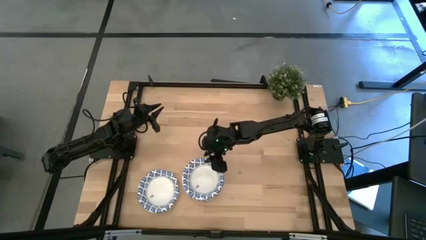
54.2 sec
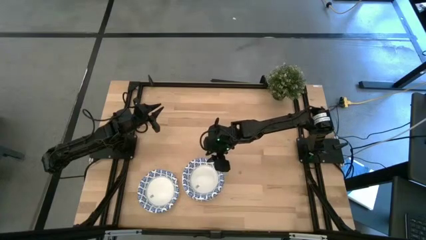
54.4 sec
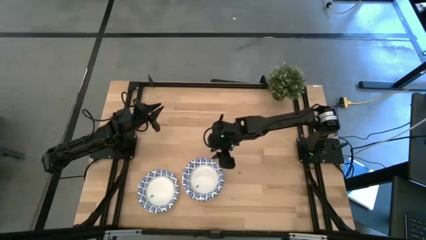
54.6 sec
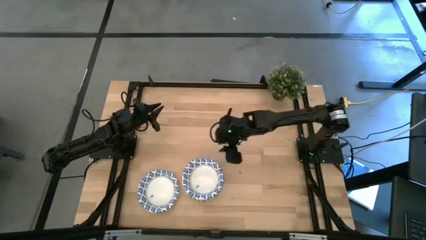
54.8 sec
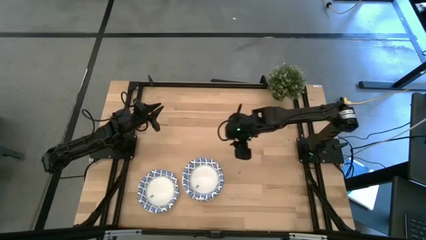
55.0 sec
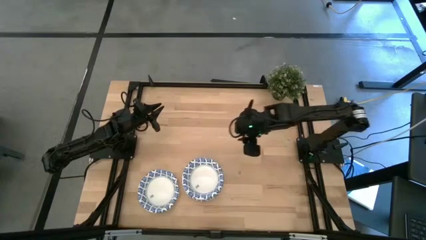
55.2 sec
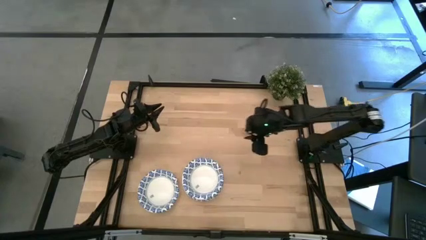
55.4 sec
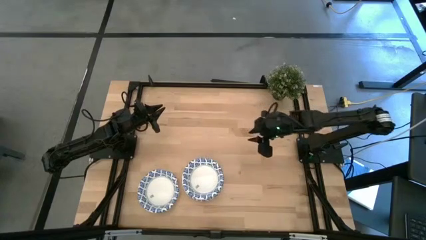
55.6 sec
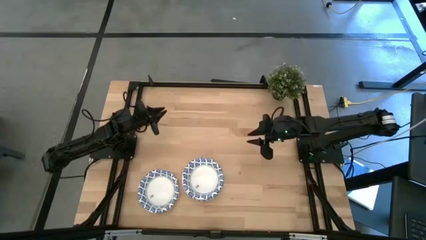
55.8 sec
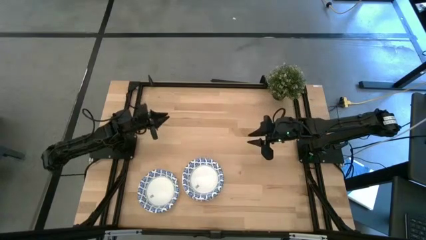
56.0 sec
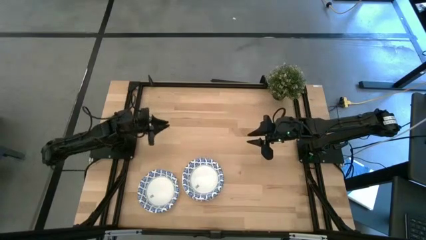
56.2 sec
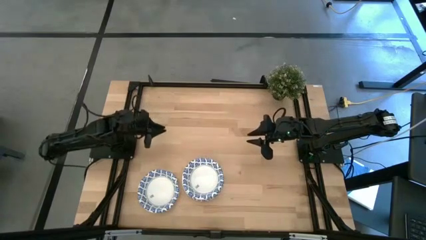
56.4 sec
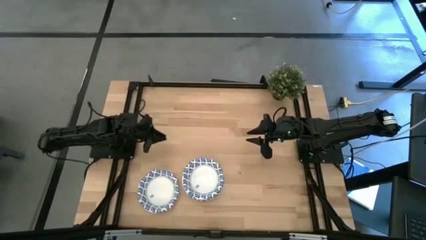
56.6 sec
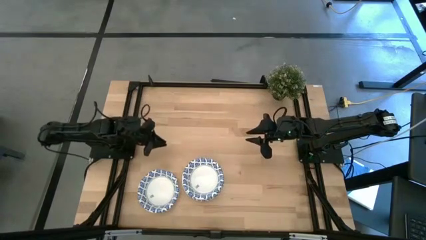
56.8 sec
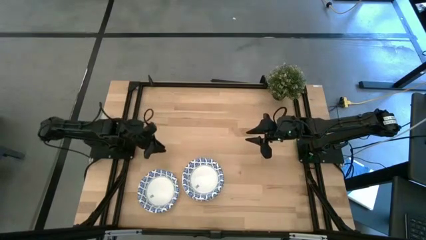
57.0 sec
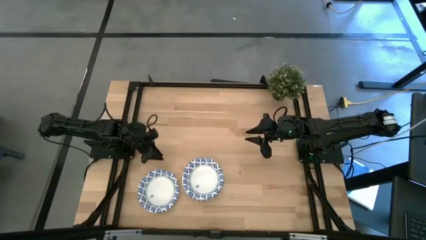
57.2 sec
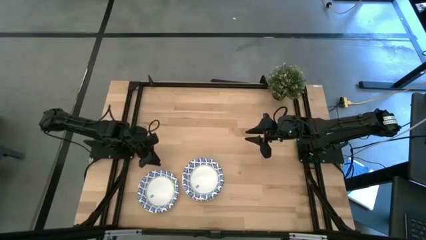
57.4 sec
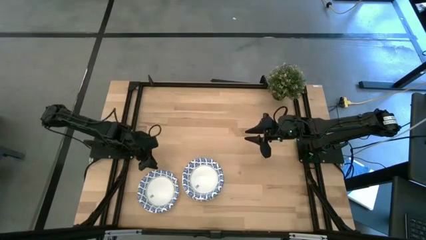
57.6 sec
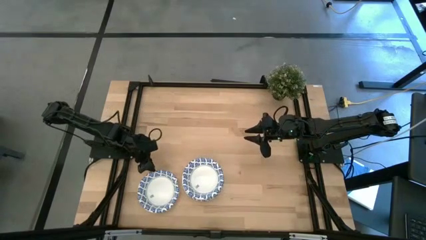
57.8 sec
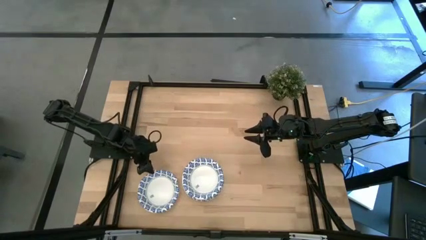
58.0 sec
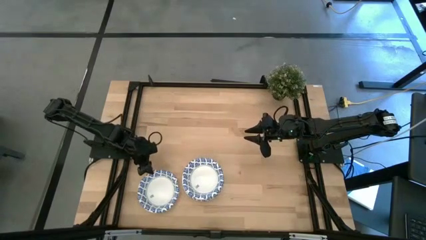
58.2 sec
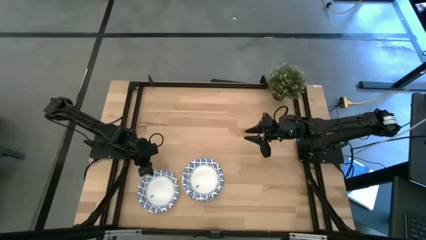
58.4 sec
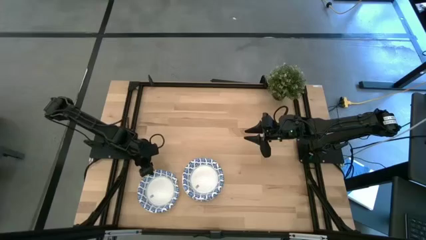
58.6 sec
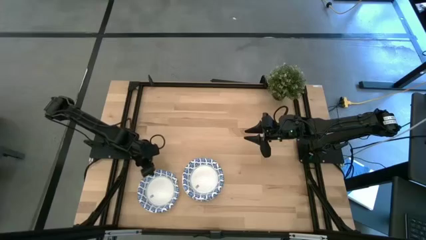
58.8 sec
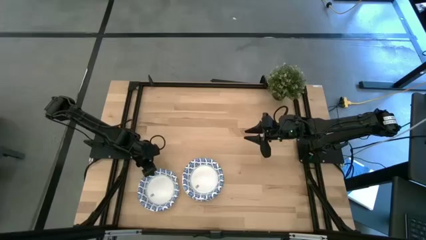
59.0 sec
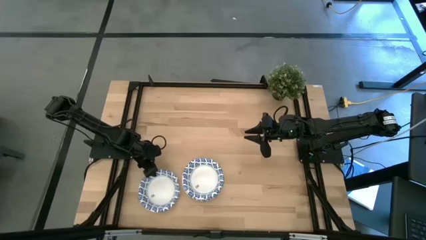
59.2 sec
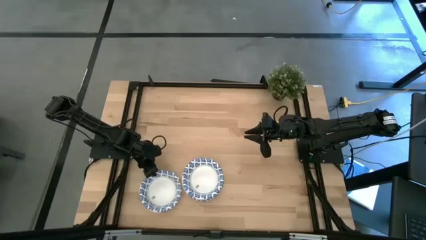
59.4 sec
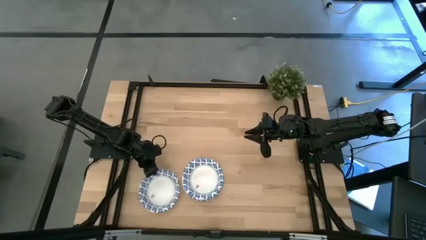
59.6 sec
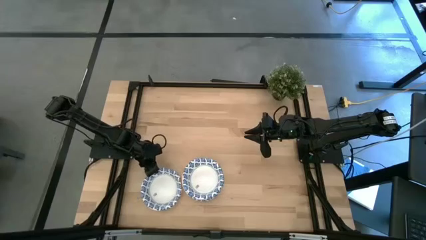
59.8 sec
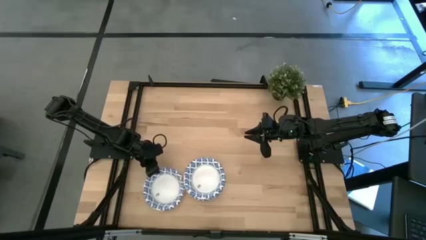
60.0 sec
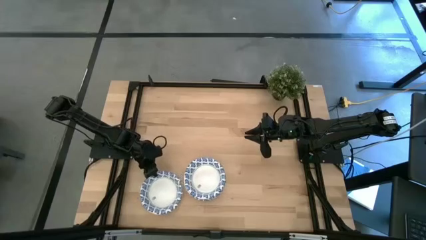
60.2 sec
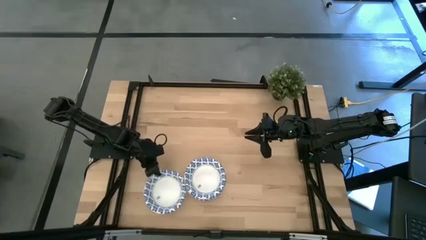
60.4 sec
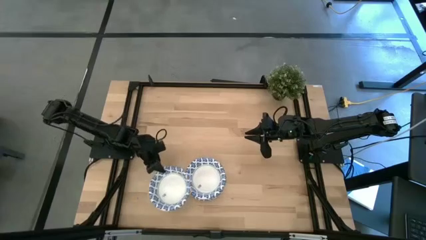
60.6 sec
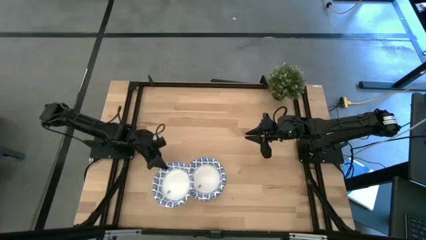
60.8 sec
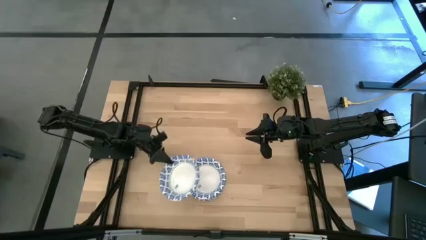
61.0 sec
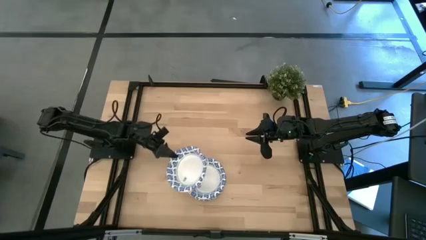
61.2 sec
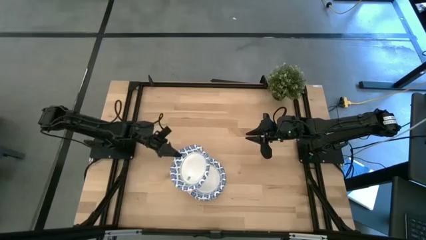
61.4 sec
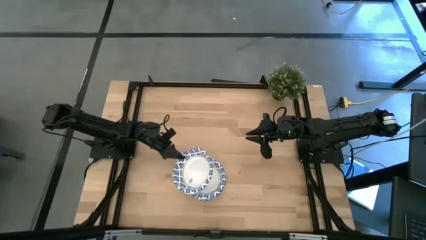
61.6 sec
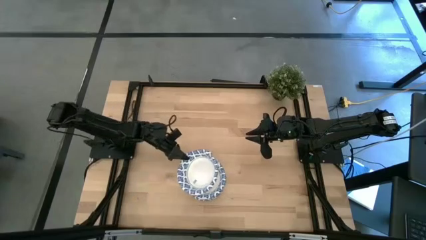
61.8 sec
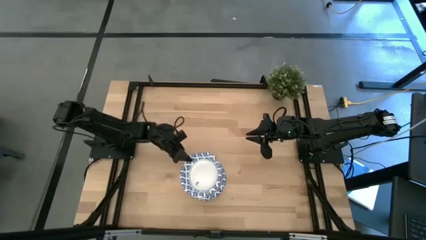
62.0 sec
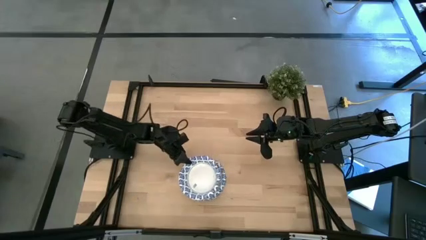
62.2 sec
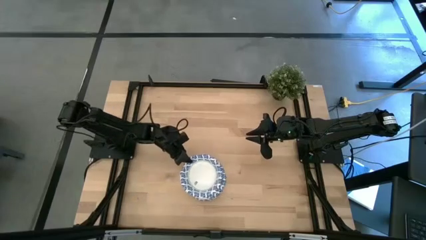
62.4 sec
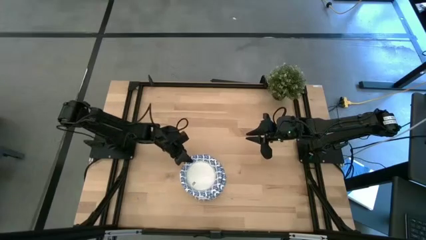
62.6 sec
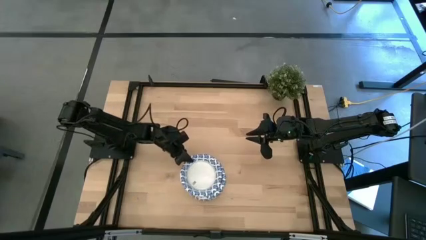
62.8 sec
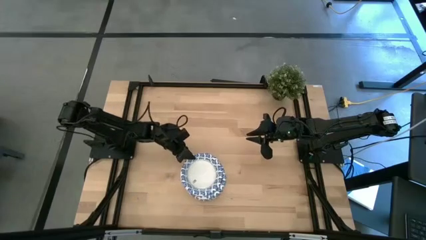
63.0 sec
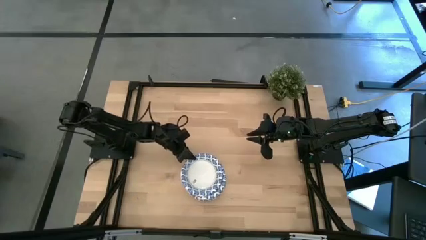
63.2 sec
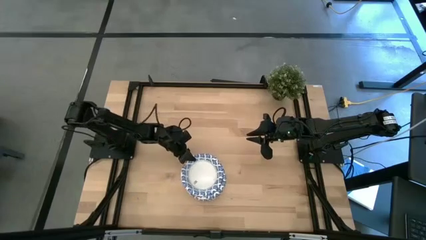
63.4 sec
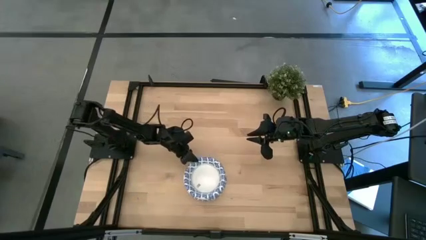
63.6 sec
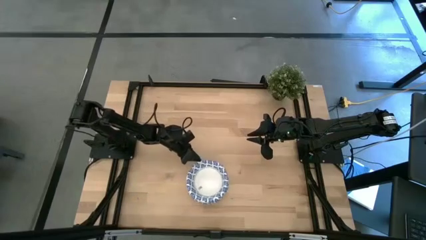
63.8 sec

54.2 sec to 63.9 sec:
Task: Nest bowls inside each other
Stack the bowl on top of the other blue bowls

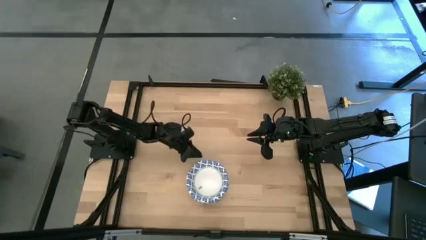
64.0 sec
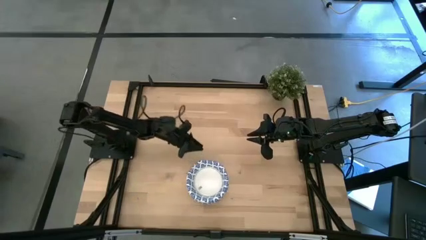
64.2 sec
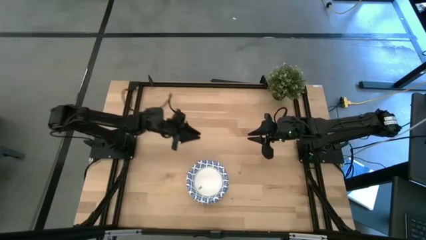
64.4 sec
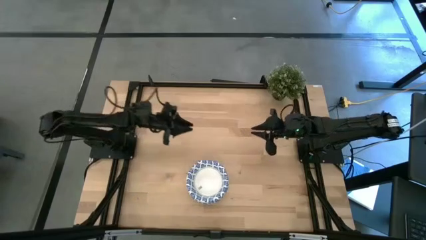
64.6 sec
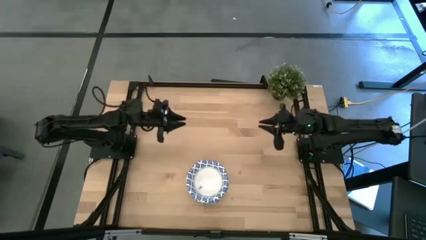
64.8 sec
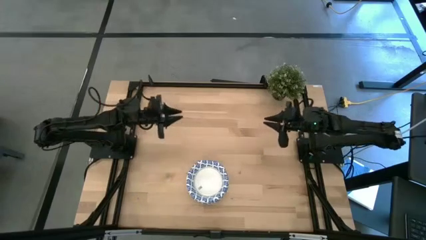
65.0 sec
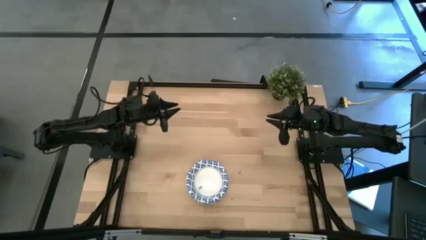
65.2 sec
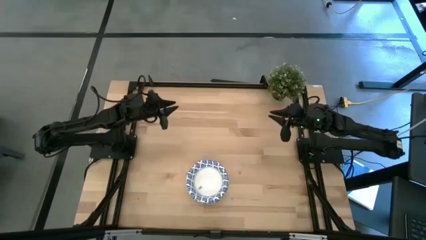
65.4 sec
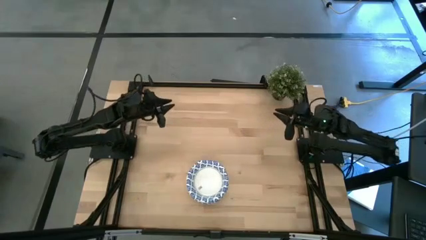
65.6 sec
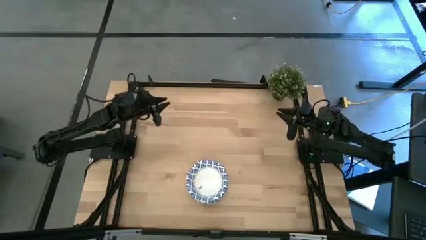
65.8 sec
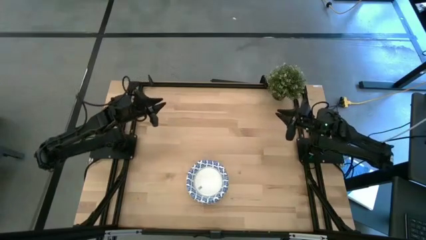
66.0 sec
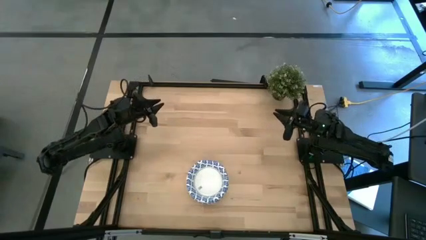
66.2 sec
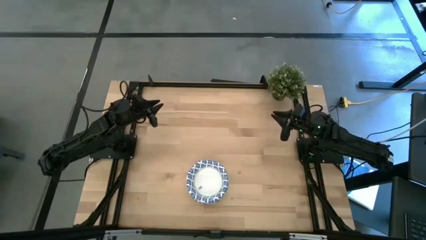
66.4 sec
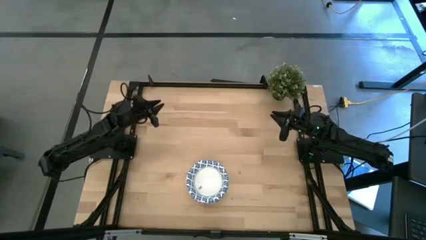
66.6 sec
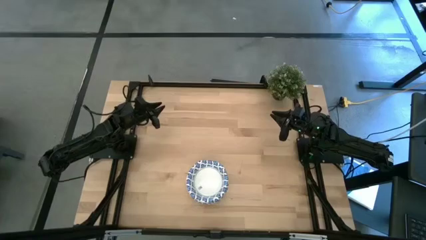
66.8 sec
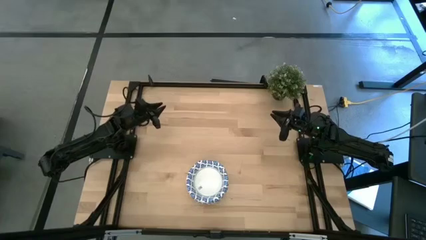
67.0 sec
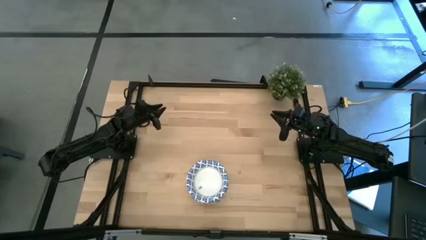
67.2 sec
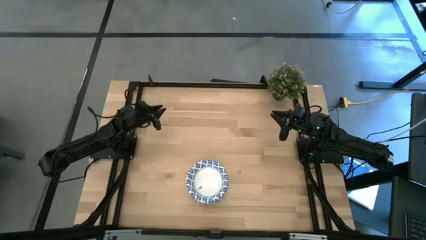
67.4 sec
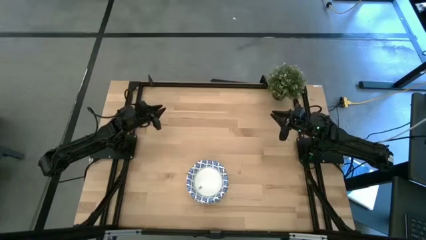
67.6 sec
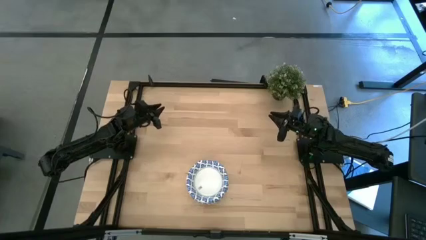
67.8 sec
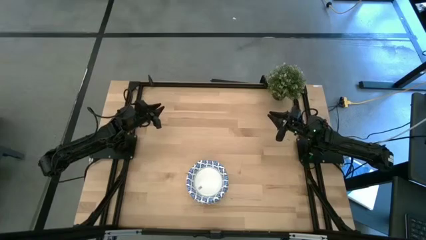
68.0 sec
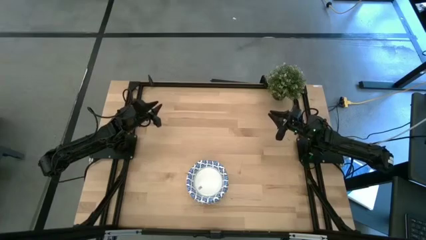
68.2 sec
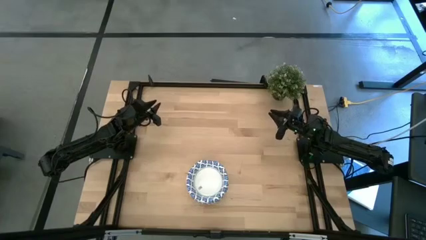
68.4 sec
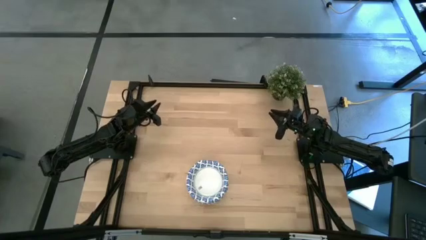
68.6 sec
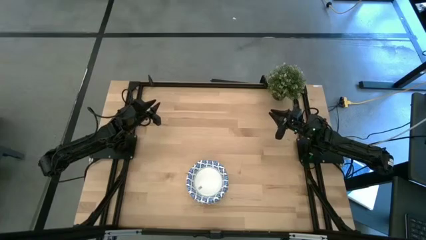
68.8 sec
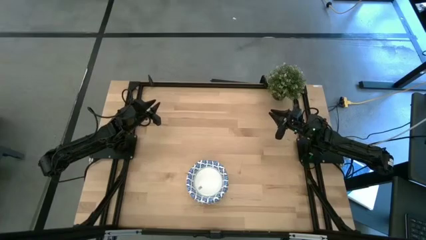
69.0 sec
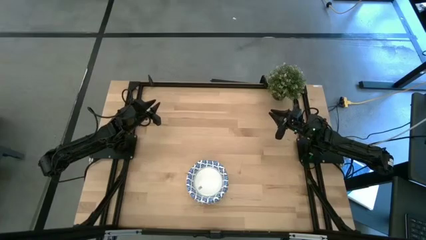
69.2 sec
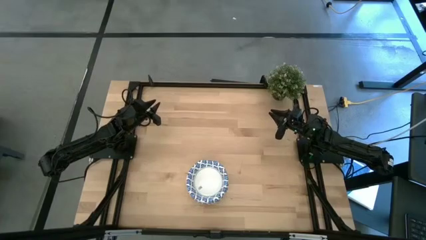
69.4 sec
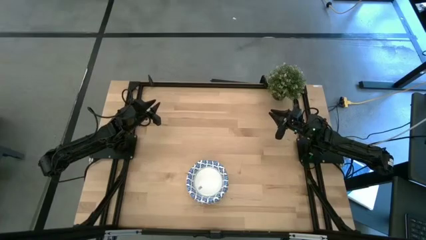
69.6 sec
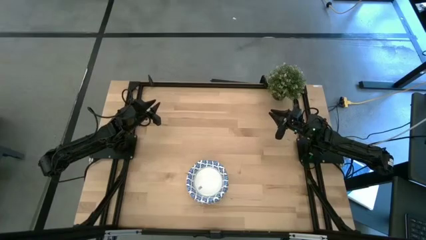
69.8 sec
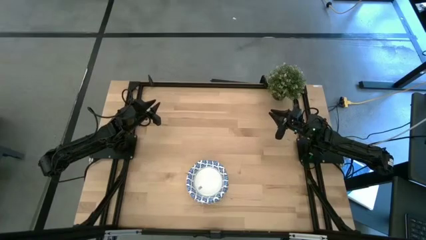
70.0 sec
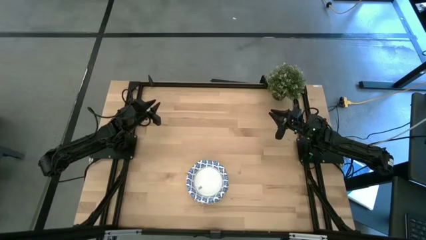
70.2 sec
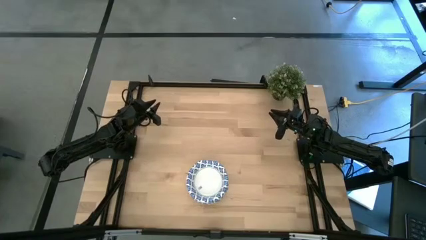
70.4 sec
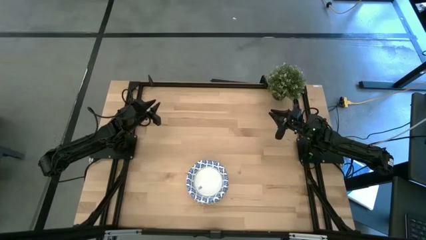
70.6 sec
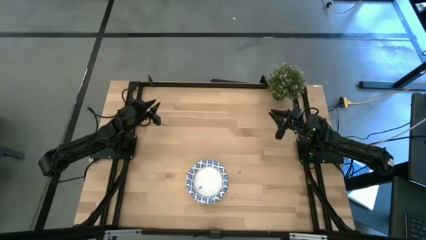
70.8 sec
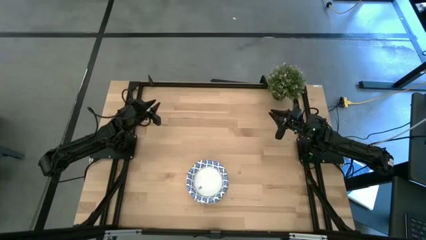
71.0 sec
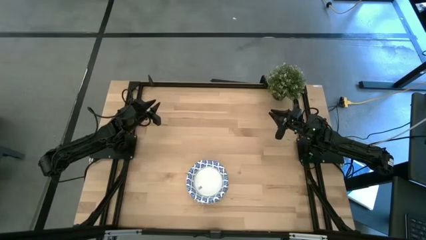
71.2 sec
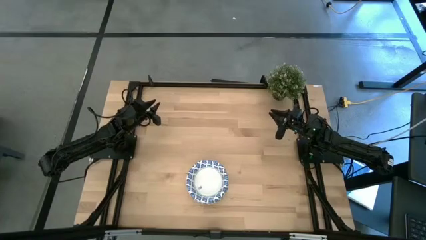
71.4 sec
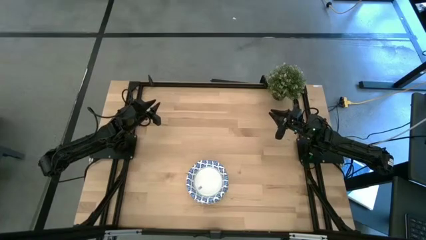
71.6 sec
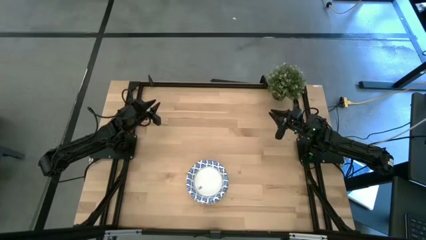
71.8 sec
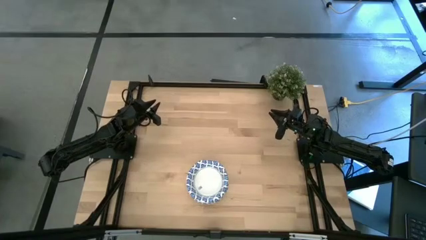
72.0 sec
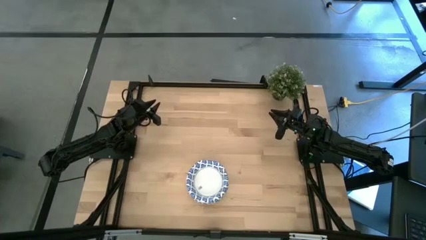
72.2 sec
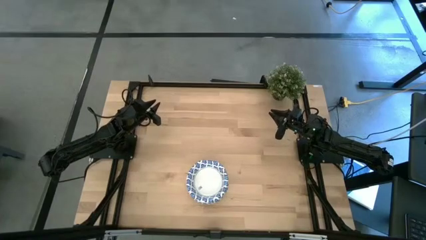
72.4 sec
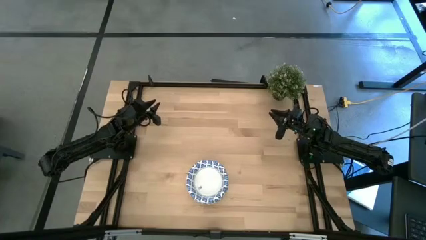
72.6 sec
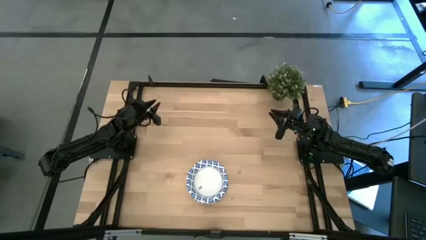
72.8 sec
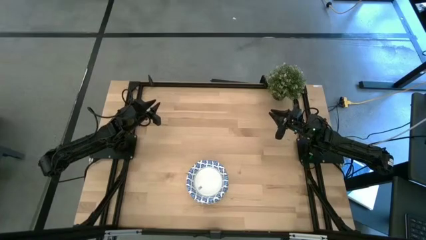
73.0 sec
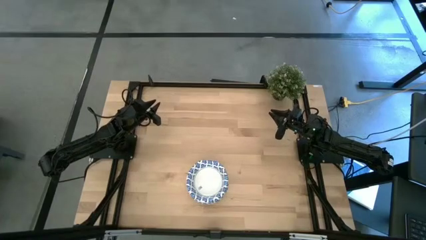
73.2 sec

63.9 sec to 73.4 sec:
Return to Home Position
